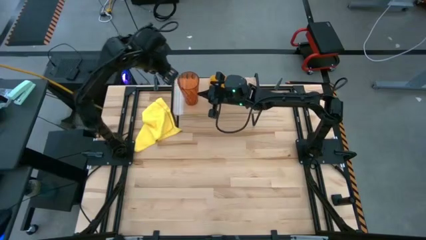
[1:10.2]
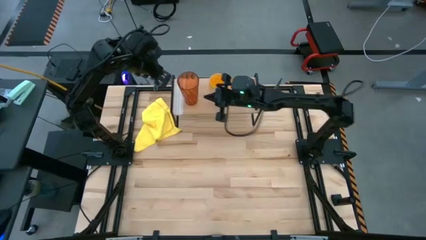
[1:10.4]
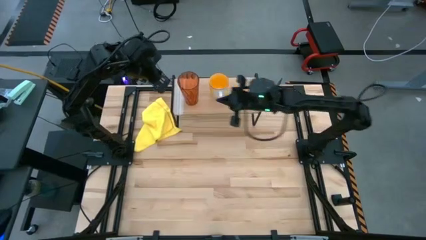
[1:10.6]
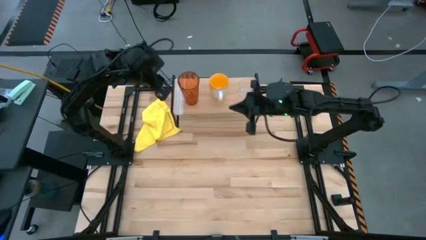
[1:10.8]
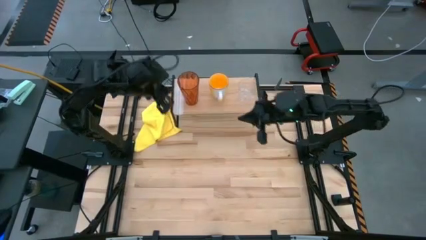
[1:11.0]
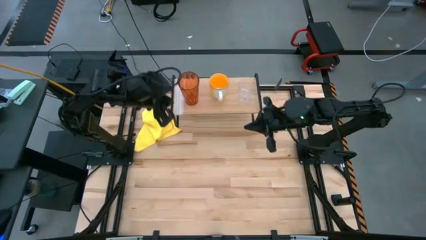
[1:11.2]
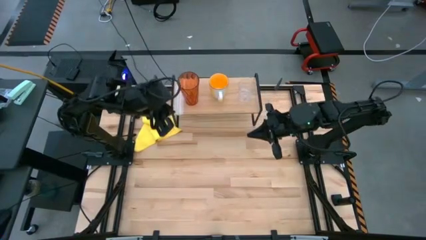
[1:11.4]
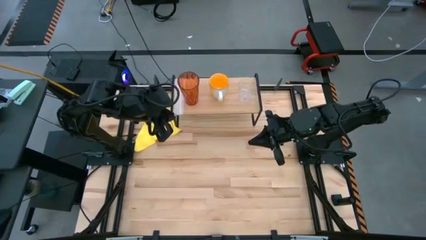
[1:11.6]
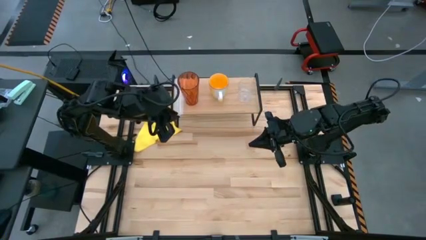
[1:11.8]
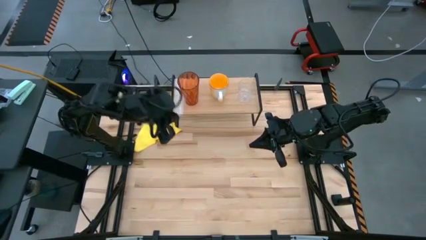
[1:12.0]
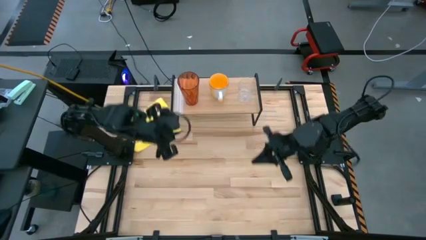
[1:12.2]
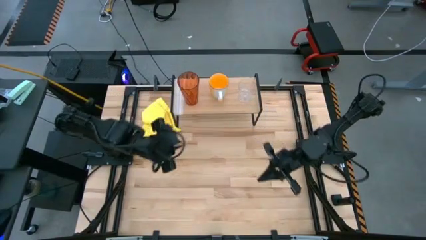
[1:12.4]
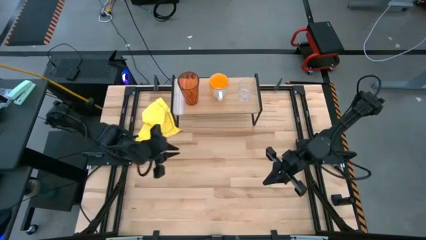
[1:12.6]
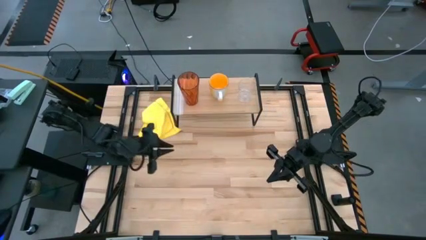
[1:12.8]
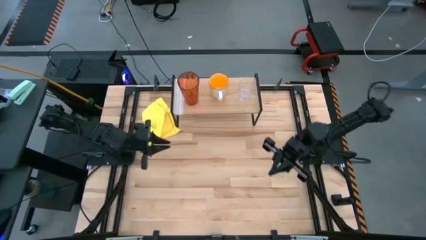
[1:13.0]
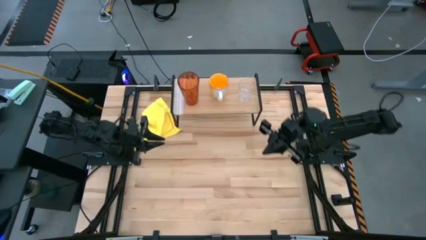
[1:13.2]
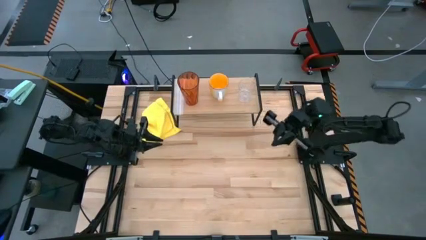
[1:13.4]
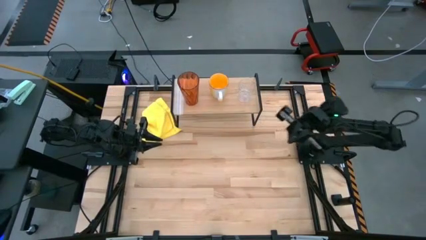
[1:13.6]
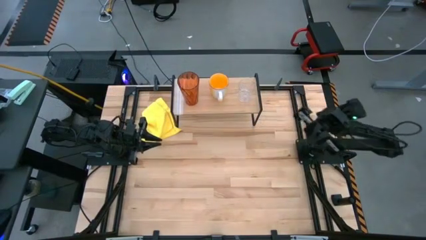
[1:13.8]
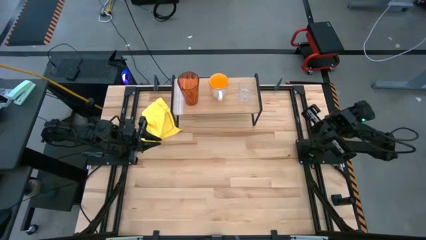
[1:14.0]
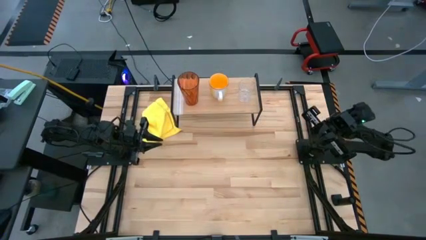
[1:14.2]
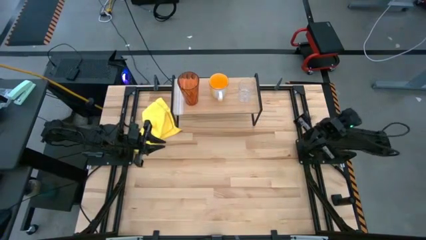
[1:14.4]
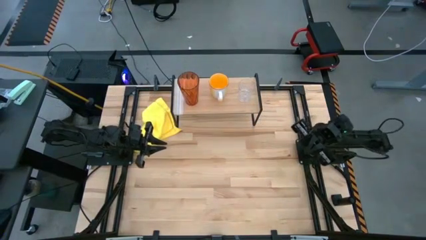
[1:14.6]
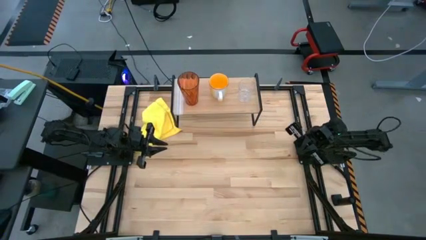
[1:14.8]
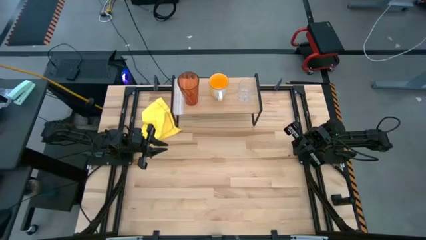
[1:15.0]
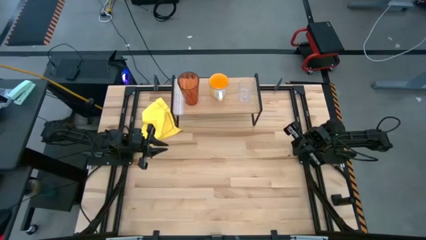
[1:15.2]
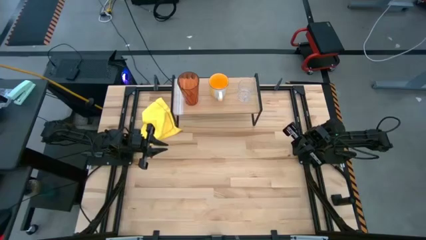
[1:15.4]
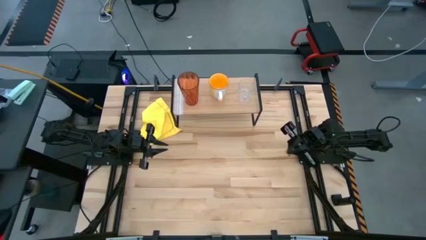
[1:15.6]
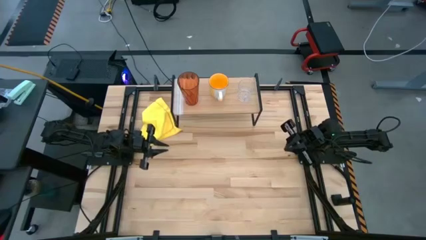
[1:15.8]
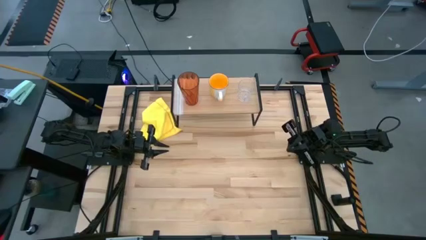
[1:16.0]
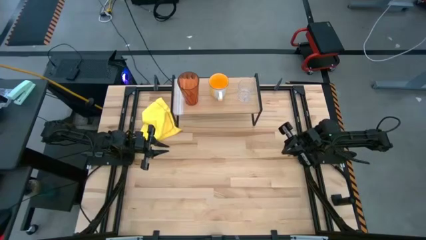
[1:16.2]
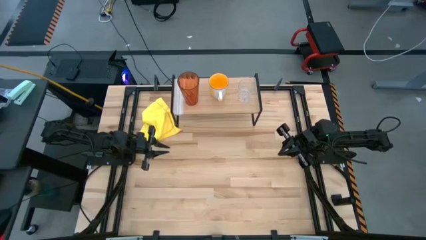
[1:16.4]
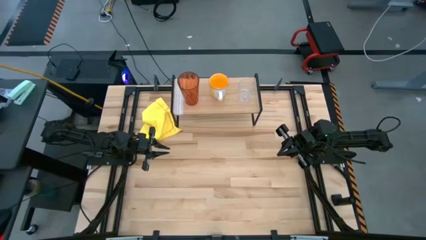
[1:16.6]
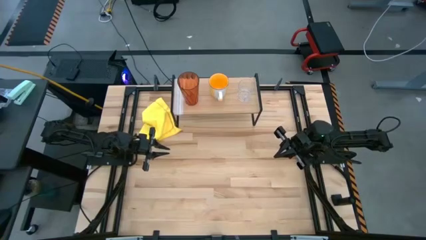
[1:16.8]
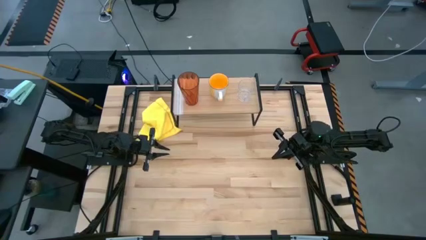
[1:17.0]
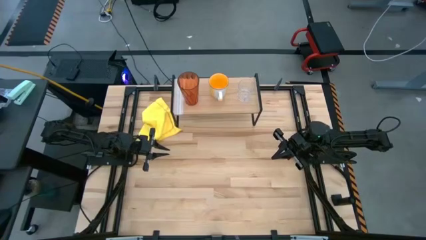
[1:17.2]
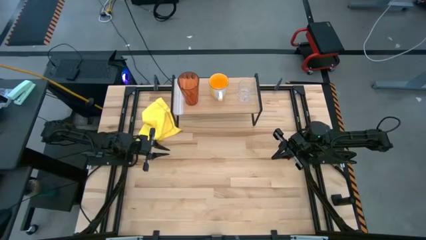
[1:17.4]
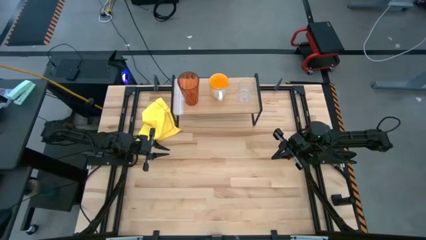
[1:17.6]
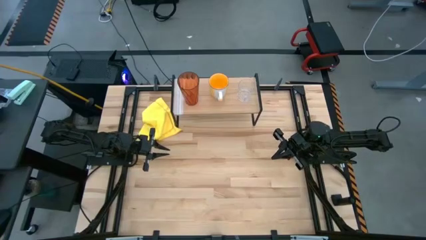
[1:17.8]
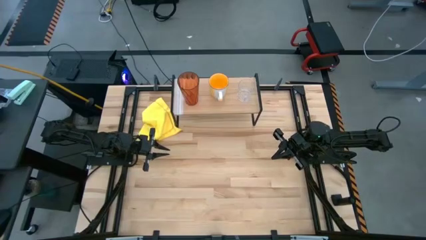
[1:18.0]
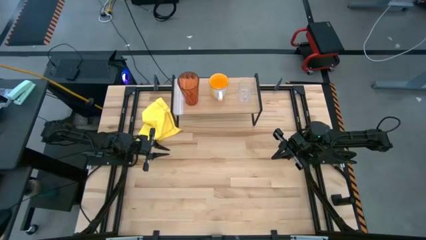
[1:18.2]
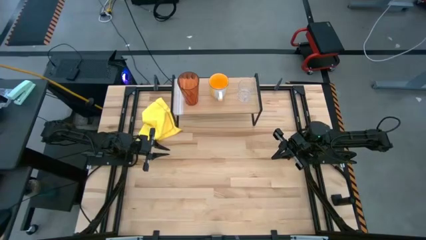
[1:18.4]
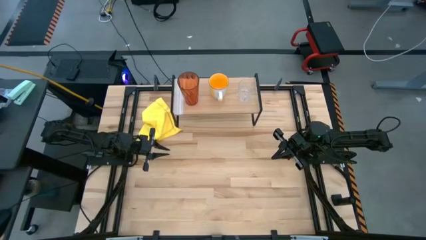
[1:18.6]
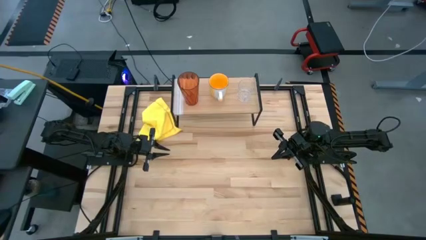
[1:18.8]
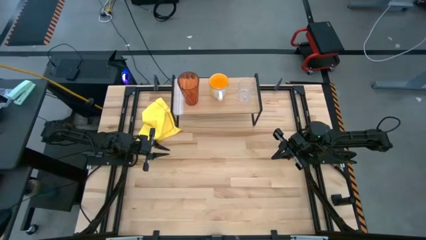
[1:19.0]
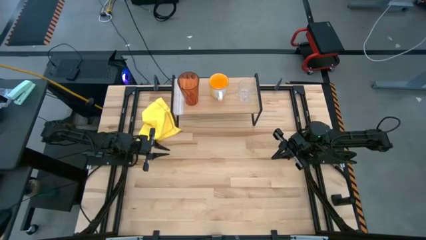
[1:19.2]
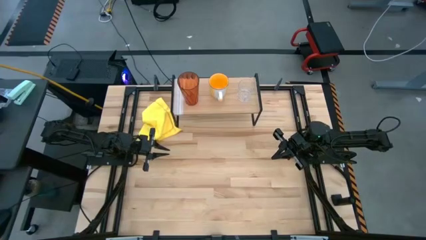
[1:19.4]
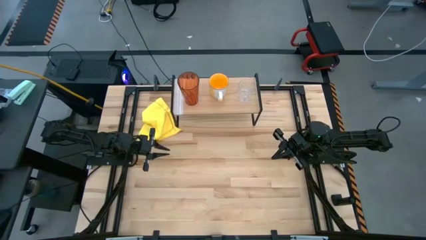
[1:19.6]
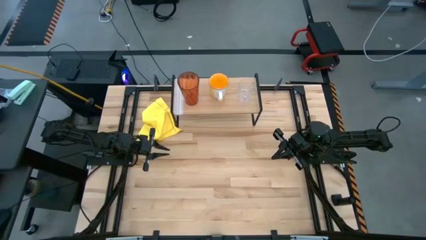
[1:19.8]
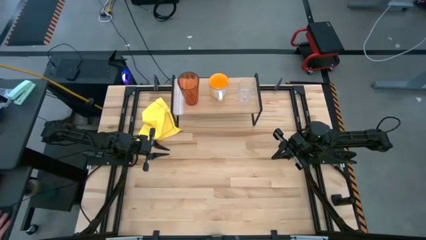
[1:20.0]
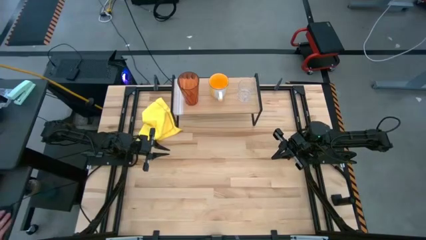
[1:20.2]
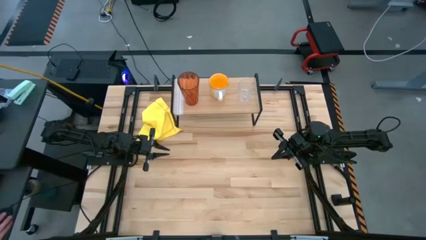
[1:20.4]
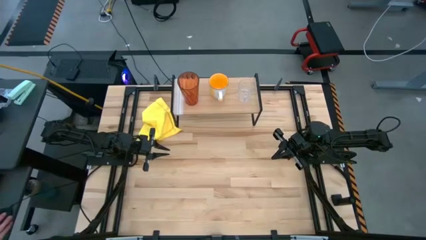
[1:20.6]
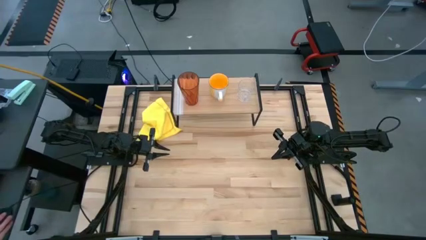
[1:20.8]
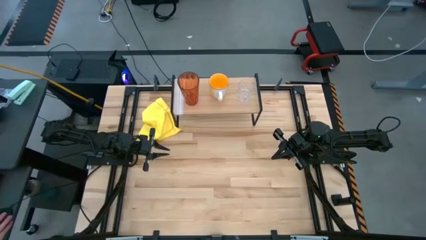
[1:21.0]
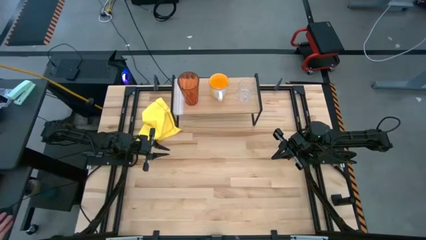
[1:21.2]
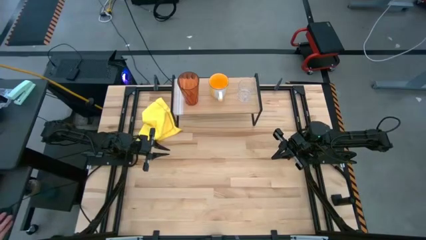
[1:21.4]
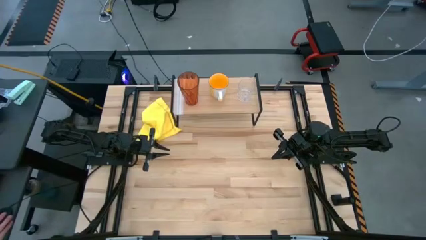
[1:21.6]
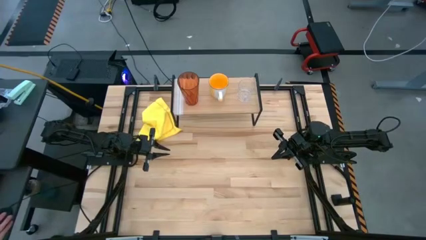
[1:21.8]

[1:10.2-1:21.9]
Task: Stack small to large cups/mugs on shelf
Return to Home Position
